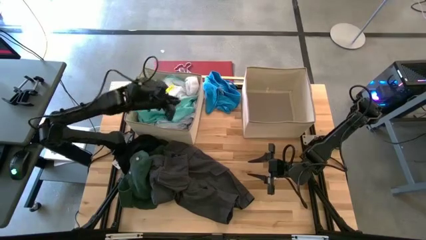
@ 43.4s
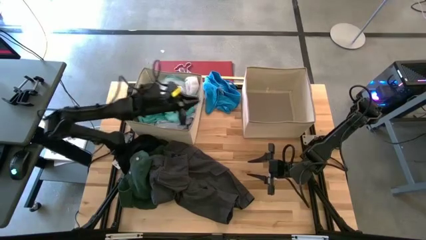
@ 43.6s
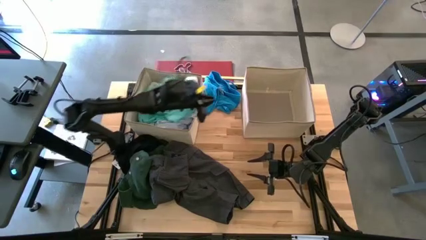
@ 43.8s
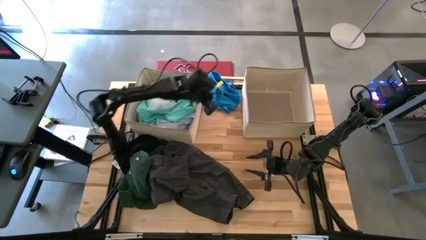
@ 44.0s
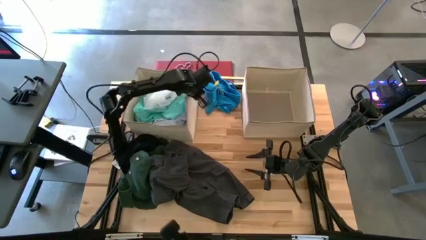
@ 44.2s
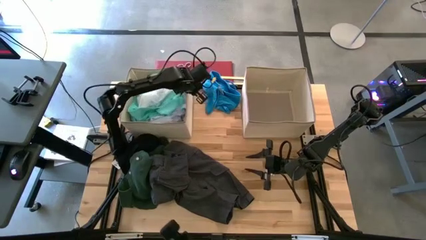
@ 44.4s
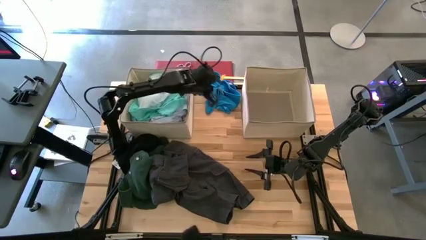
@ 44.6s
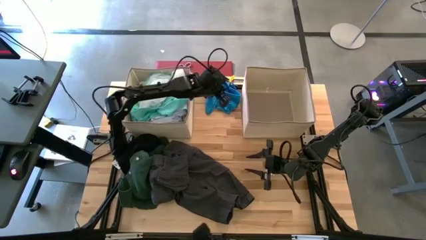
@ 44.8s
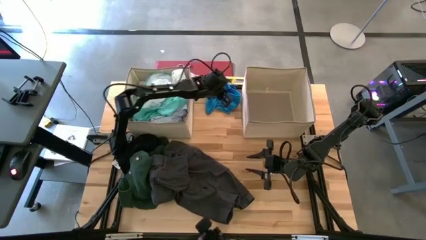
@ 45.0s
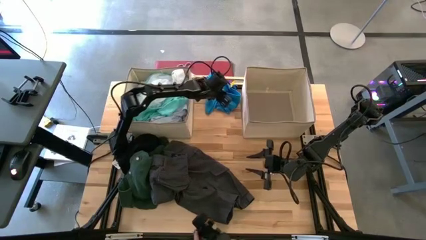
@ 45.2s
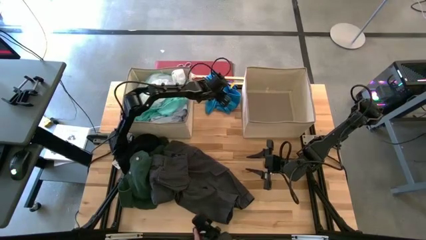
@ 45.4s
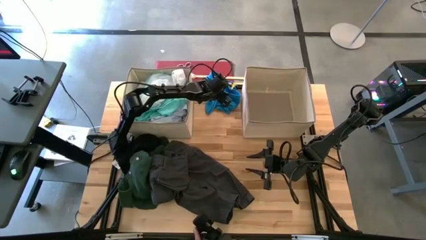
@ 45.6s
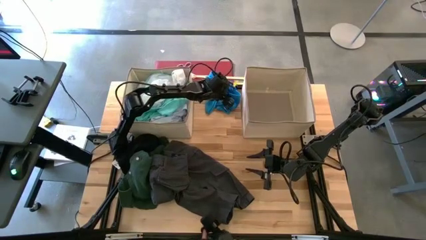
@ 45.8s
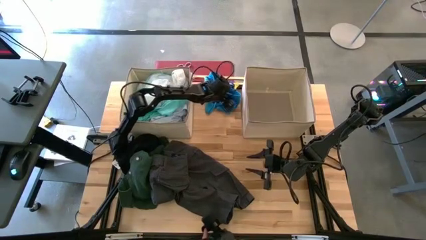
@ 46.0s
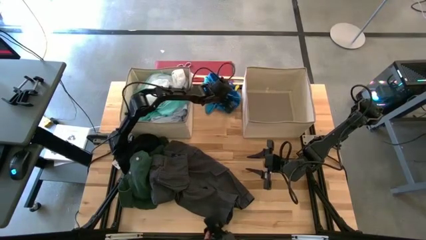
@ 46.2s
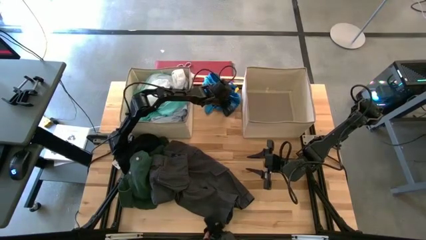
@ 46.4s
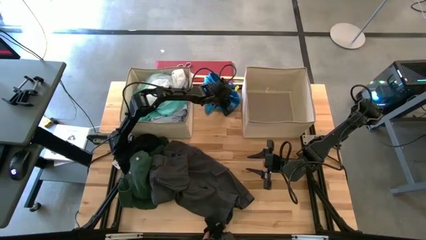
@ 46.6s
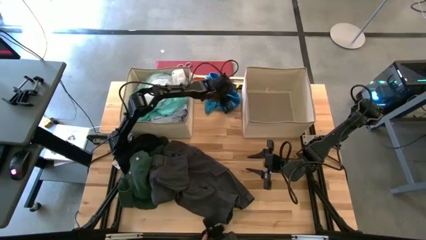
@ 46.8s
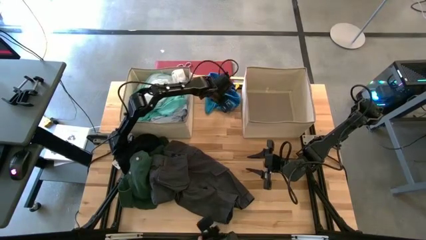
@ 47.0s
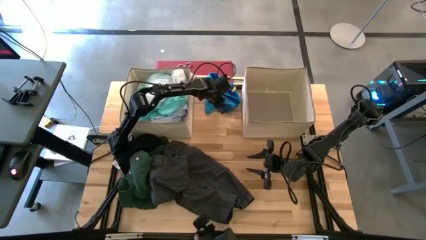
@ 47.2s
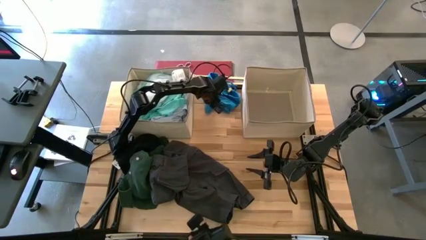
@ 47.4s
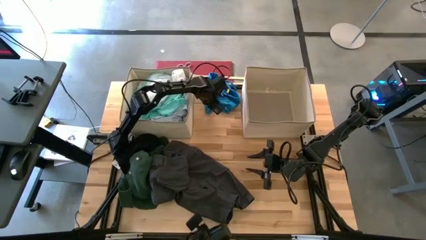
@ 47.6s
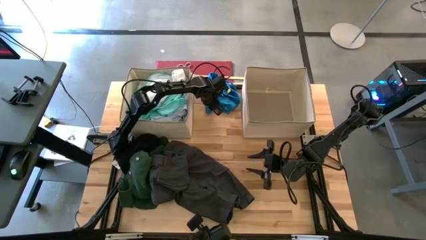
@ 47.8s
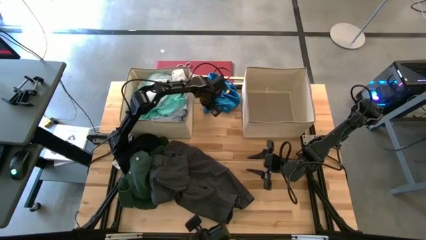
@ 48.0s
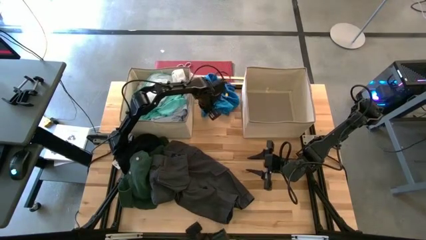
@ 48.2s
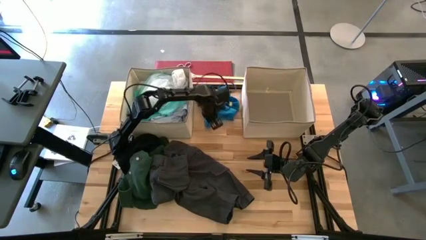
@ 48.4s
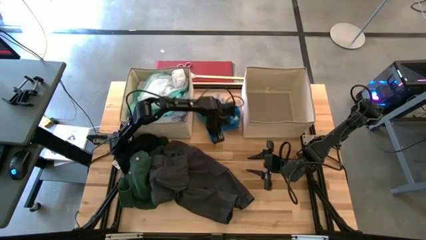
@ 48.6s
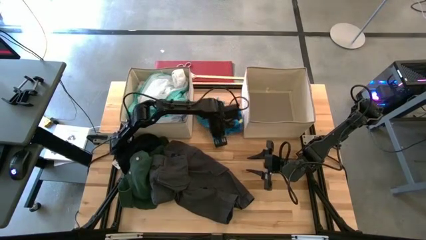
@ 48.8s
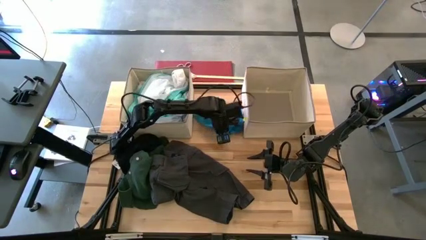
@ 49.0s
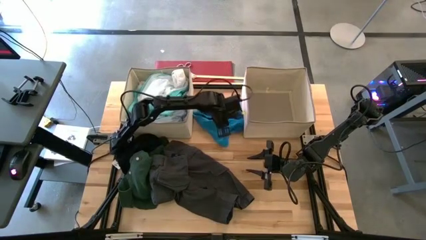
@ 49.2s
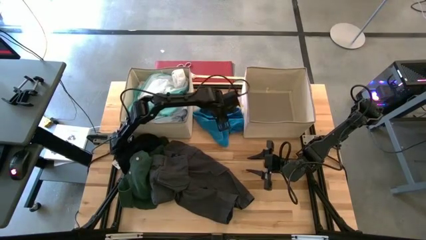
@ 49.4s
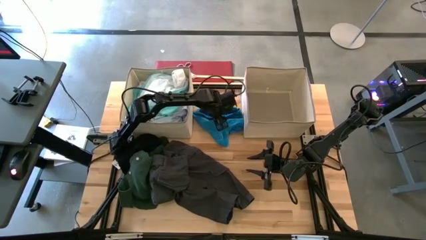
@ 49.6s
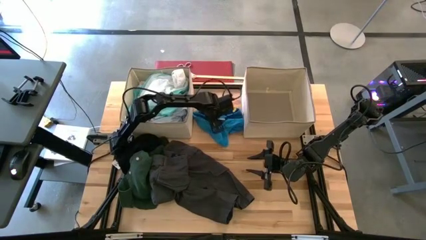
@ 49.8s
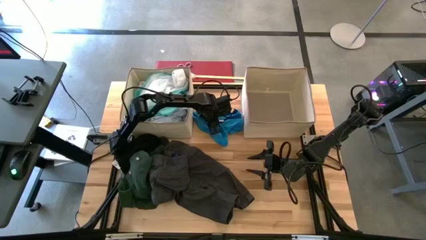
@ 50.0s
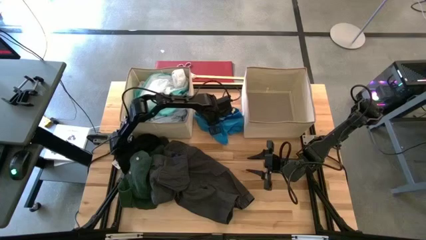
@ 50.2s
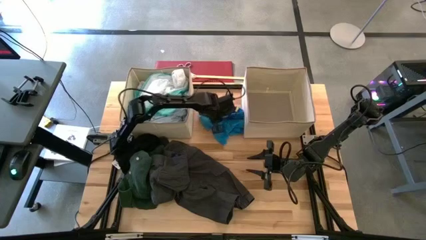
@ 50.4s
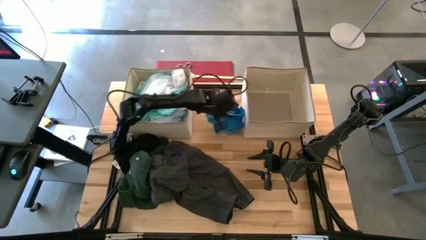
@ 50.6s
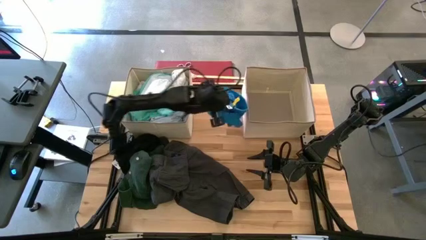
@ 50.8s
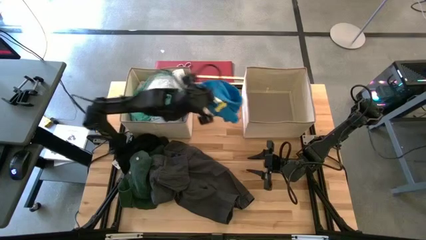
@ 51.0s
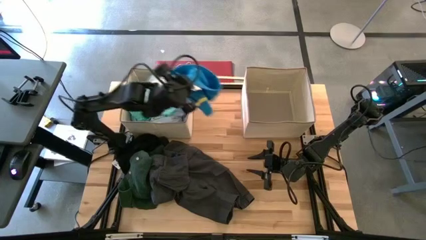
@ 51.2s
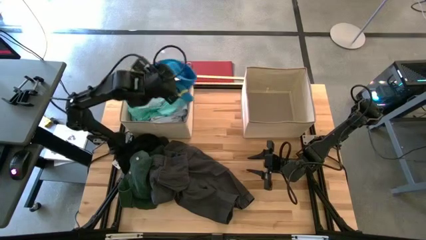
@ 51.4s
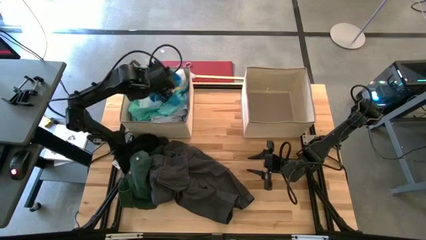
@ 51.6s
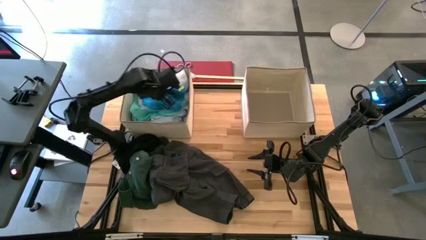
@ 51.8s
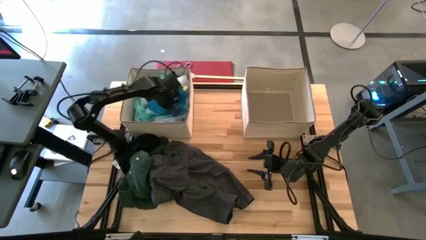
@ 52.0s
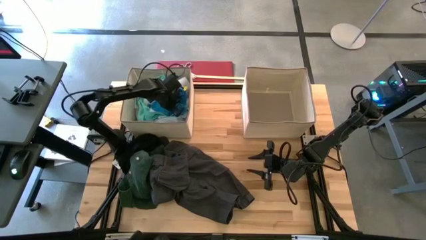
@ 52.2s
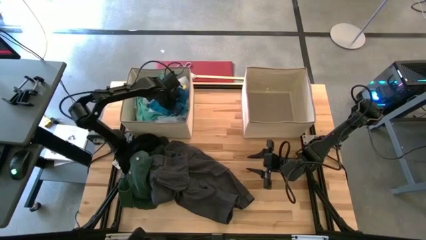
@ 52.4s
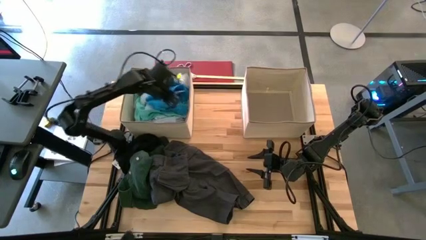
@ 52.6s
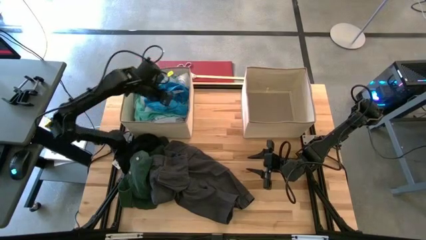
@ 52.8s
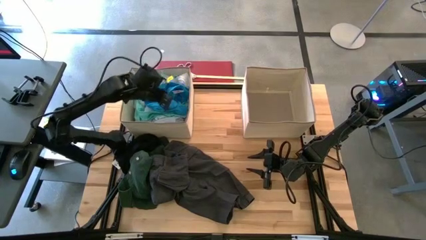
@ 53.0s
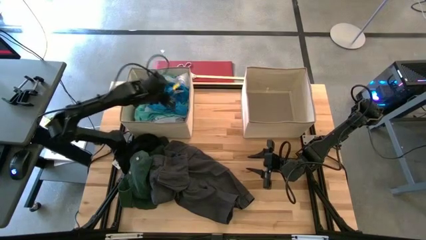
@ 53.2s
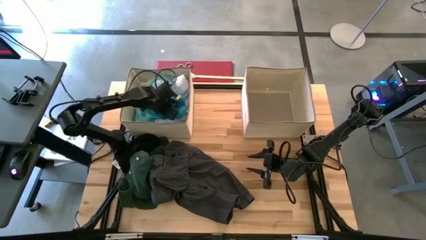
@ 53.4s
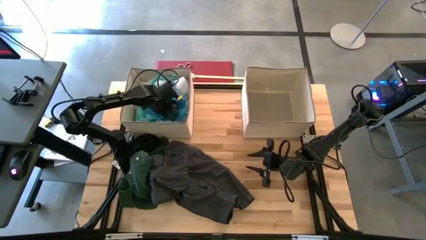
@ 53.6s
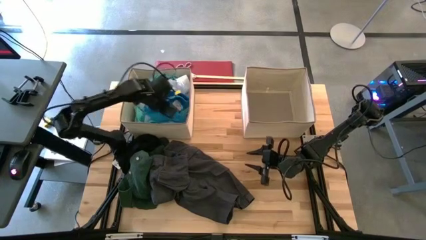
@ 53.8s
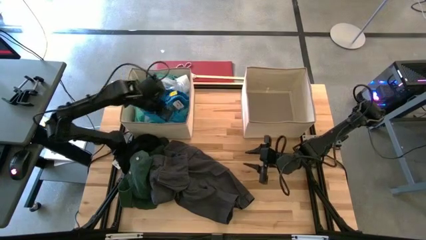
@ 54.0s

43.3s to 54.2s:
Task: Sort clothes
Put the blue shorts into the left laundry organizer

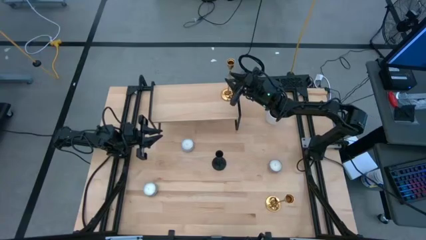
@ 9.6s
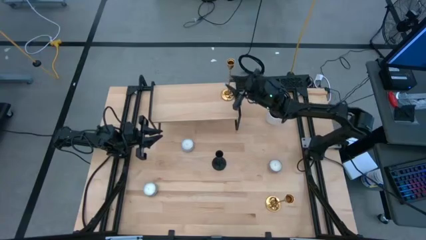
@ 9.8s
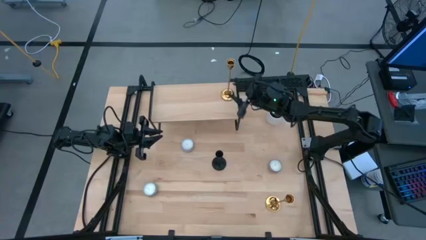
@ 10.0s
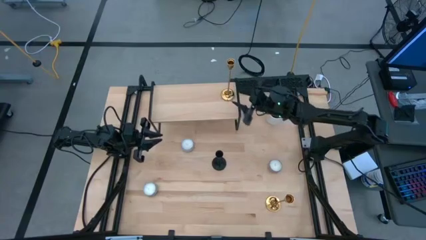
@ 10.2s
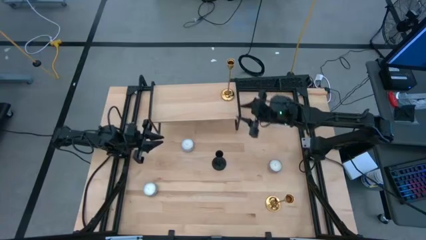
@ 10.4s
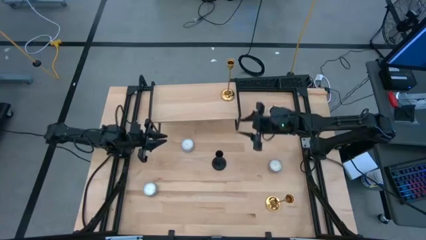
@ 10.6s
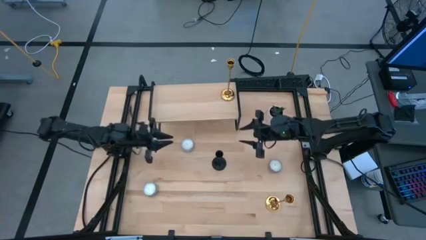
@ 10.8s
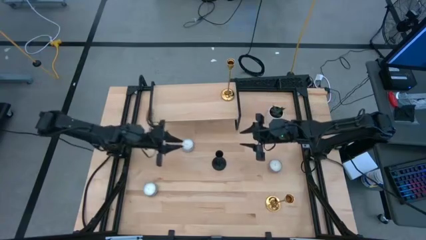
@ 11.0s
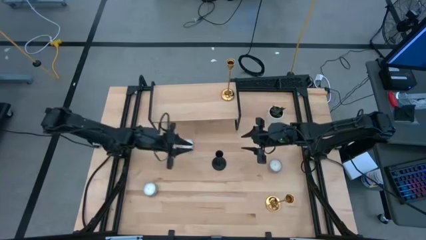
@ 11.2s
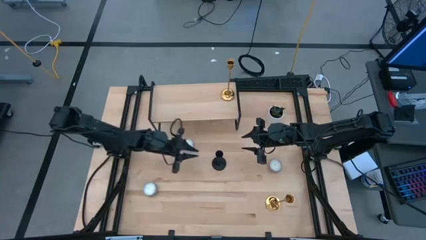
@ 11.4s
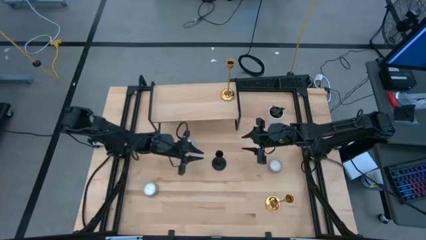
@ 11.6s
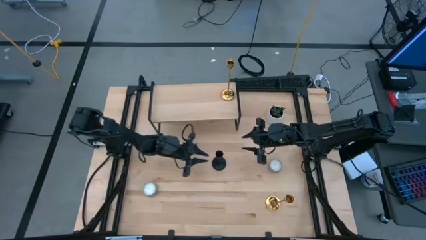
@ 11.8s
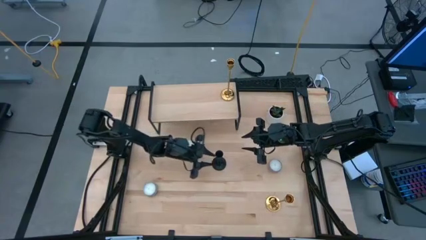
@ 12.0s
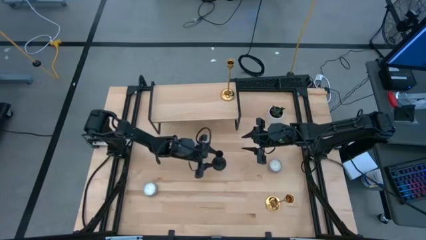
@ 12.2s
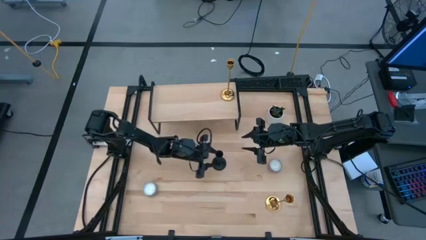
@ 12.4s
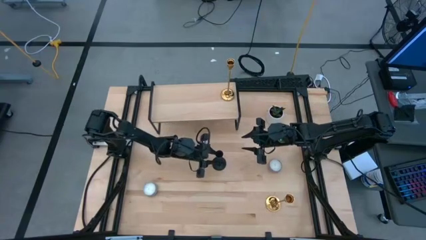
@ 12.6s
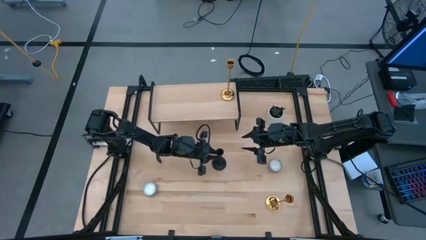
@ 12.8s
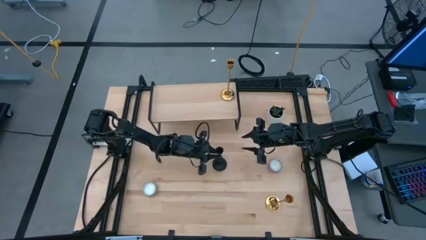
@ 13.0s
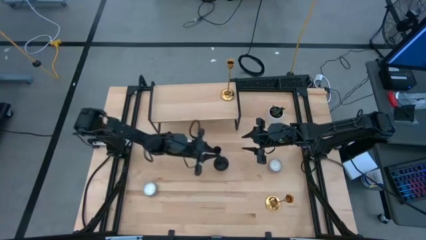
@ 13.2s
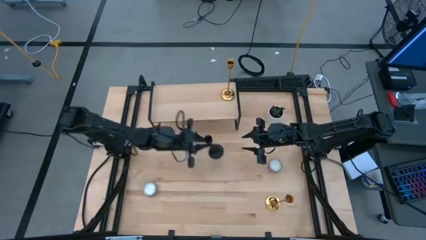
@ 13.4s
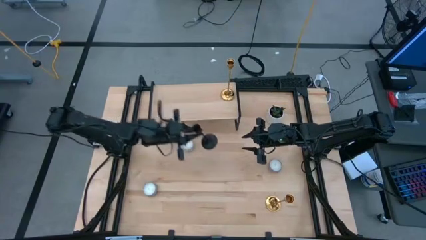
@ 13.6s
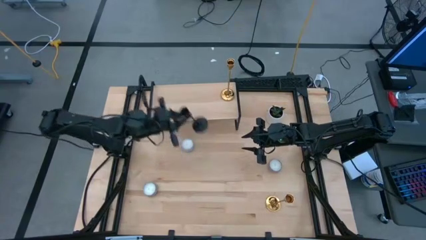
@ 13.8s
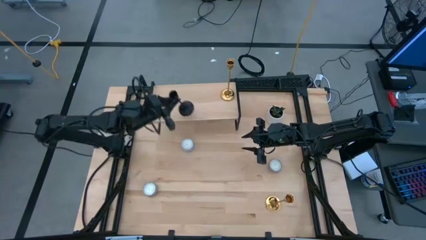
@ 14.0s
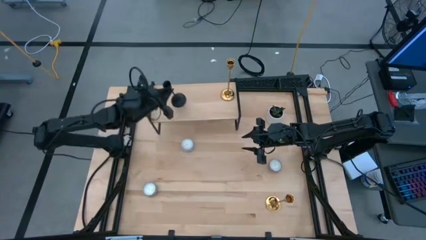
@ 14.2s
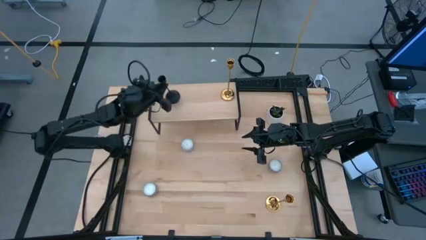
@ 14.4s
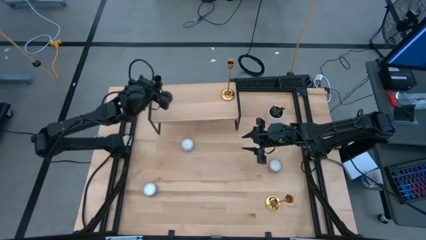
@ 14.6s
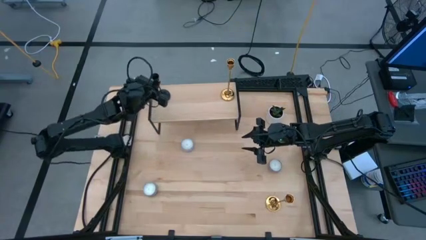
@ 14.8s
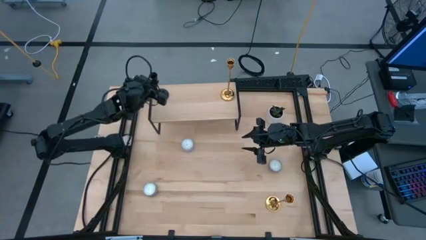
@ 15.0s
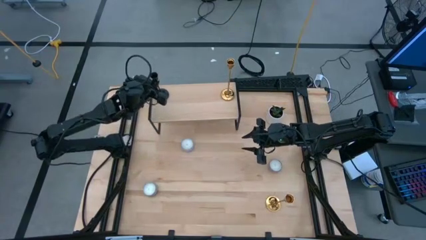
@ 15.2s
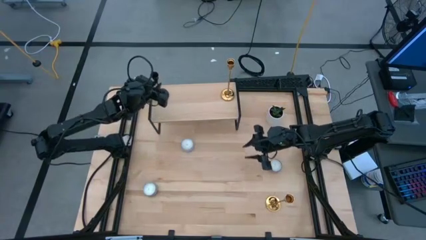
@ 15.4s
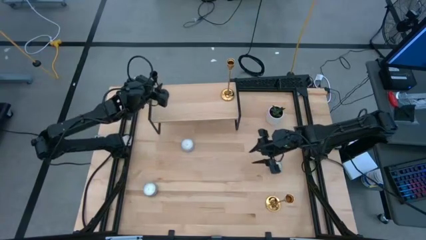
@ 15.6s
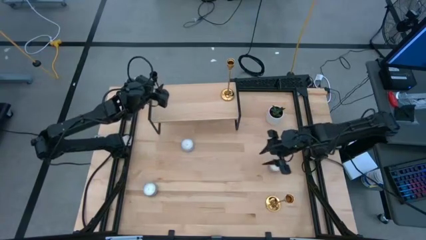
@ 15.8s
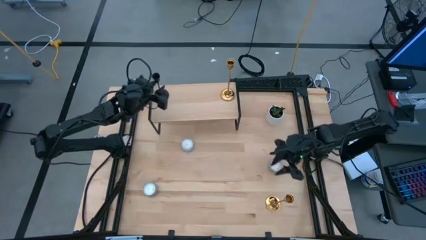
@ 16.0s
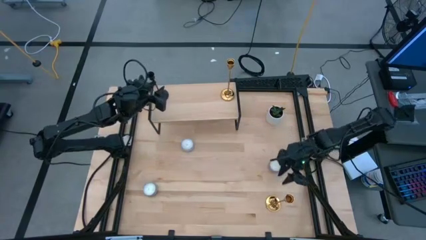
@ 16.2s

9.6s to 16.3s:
Task: Pick & Place candle stick holders
Put the black candle holder on the shelf
